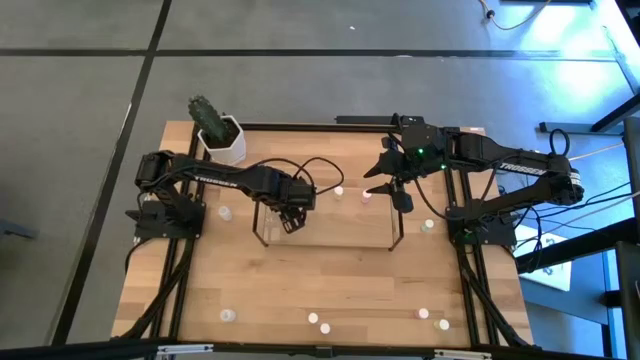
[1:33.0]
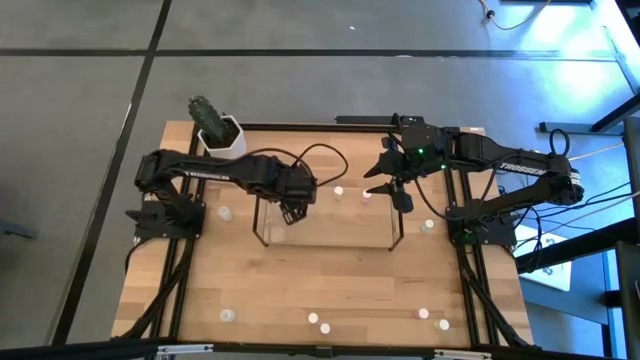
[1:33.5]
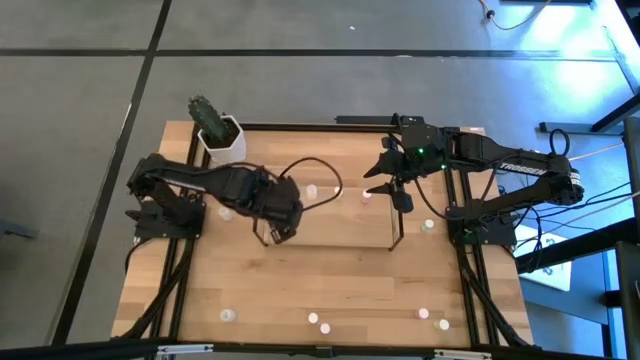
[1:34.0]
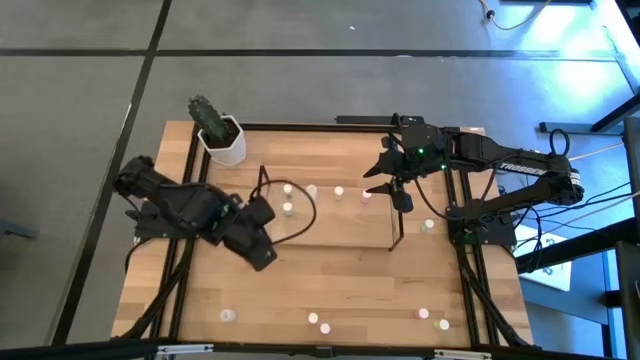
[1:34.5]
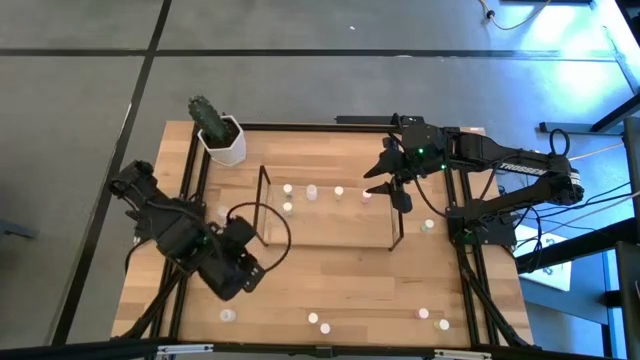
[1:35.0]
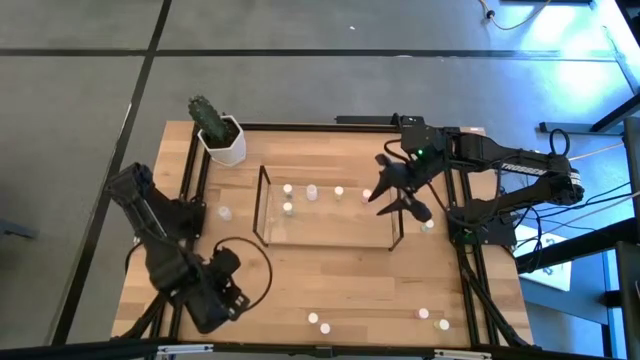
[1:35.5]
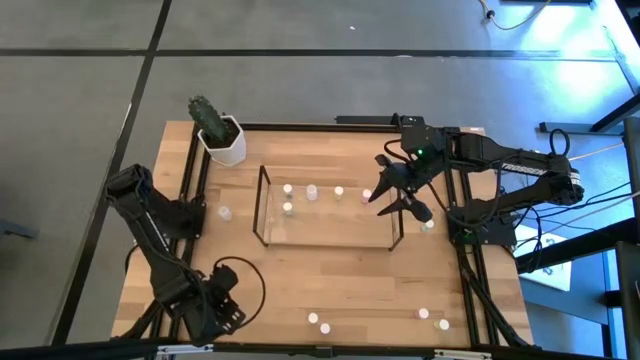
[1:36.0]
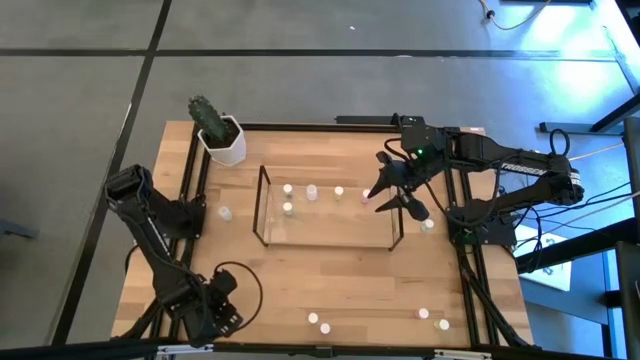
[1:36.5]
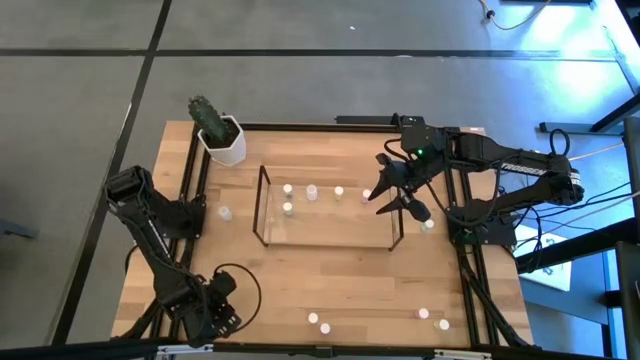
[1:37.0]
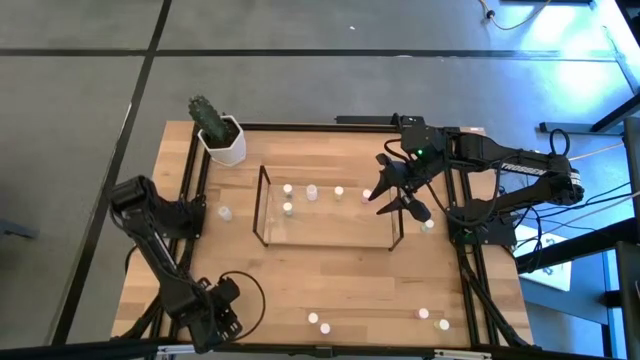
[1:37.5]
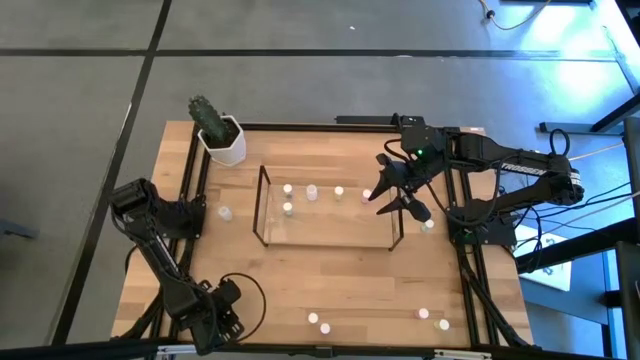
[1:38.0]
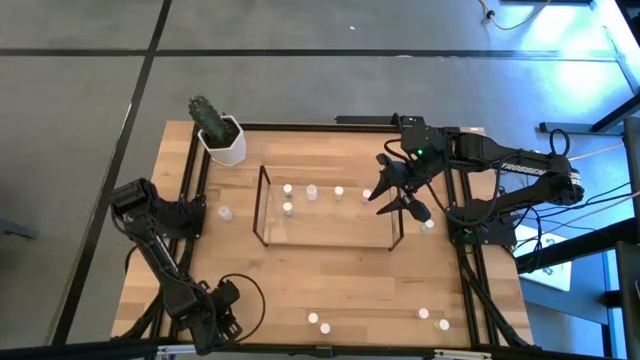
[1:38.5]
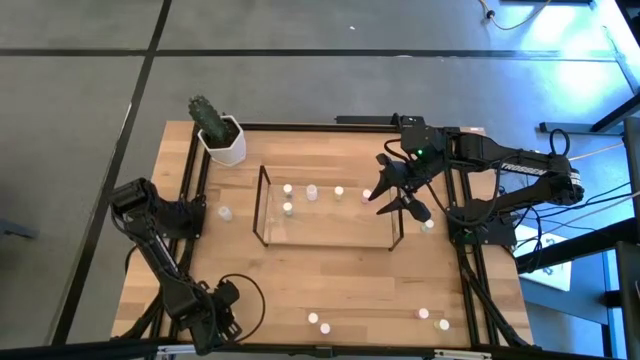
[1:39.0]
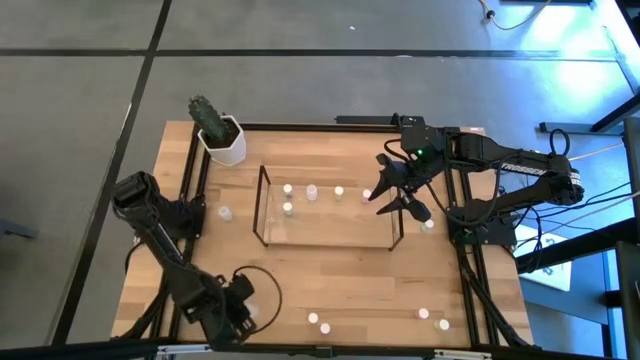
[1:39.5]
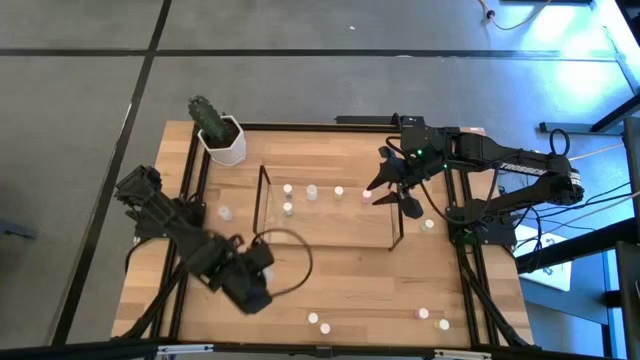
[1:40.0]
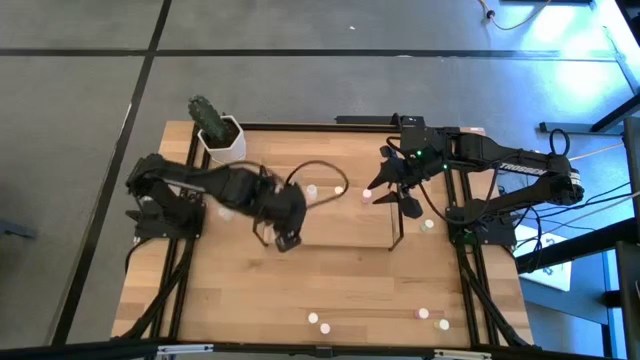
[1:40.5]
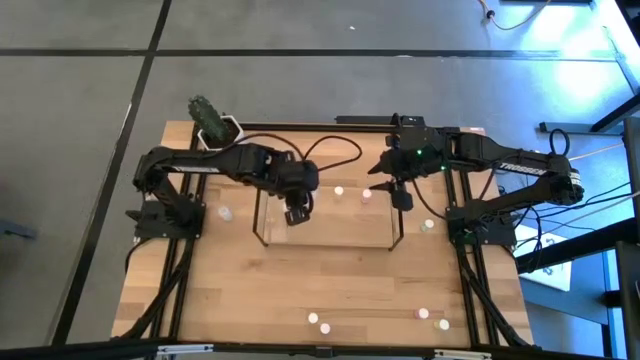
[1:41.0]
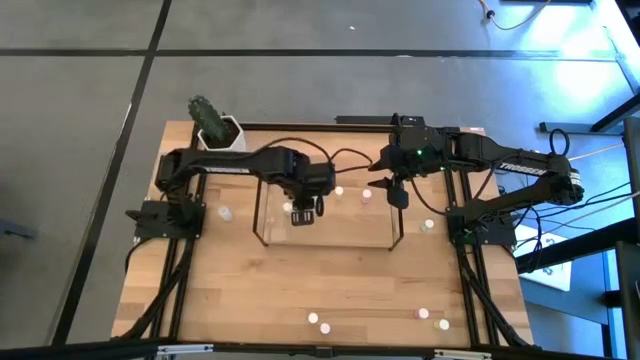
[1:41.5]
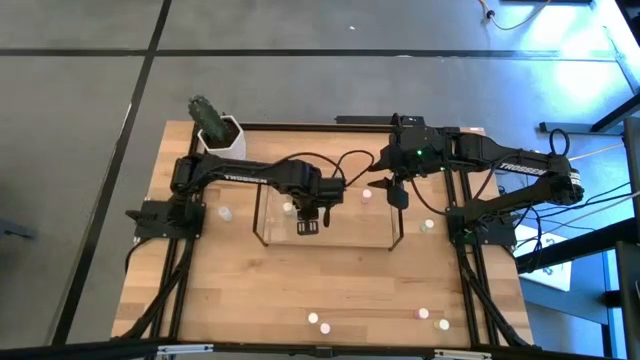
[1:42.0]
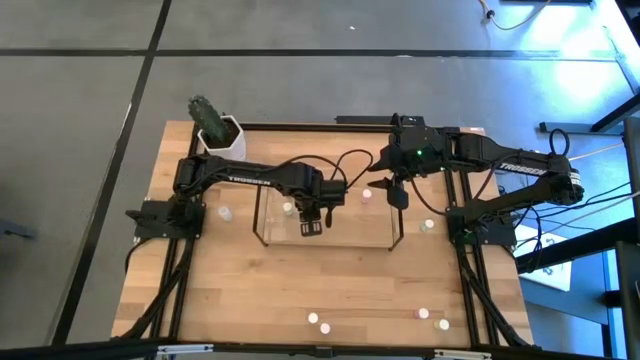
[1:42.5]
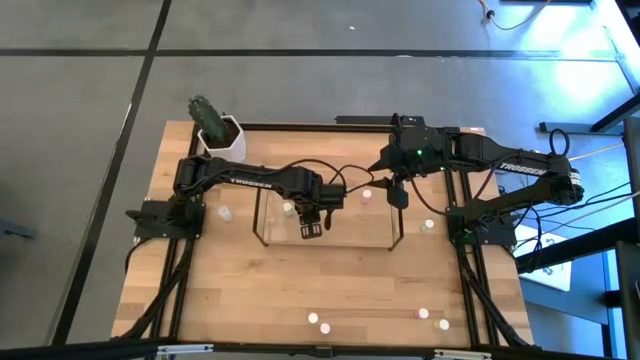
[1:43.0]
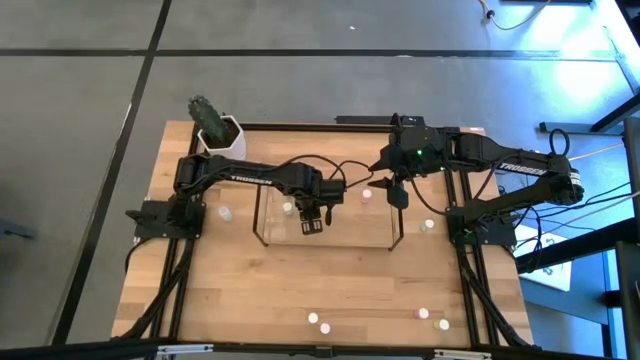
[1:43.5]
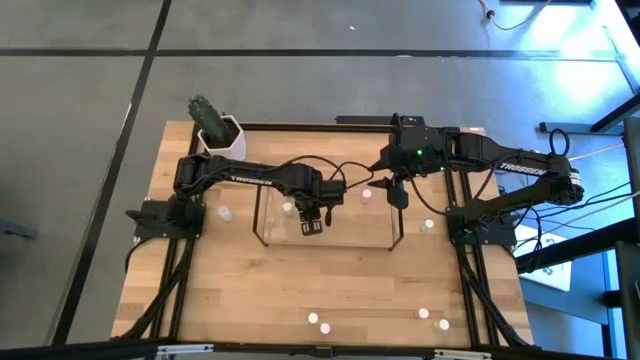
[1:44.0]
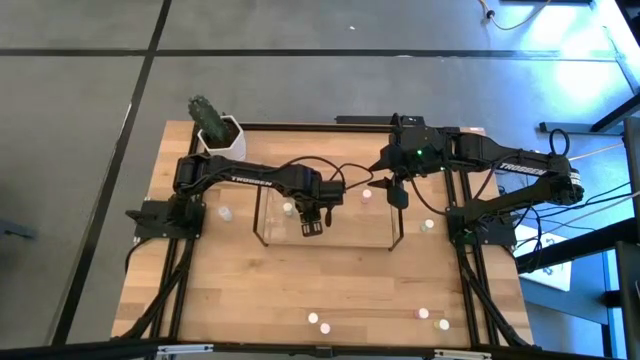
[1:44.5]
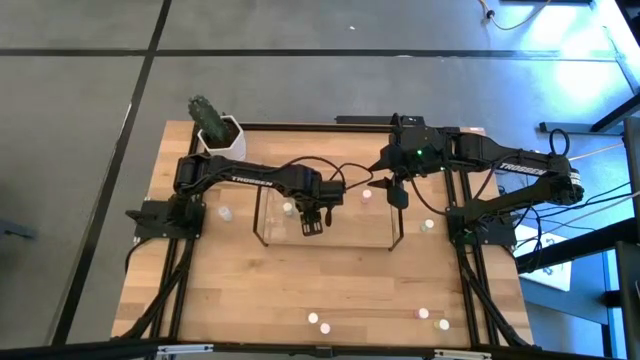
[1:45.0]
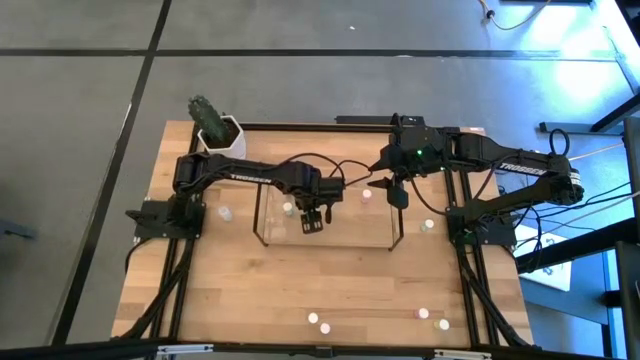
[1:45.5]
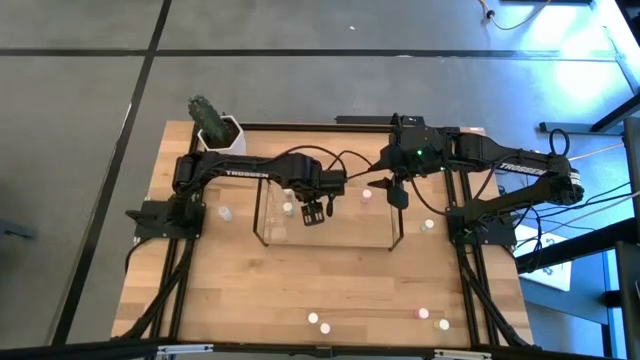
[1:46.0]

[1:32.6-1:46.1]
Task: Pick and place medicine bottles onto shelf by color
Put the bottom white pill bottle aligned with the other white pill bottle on the shelf

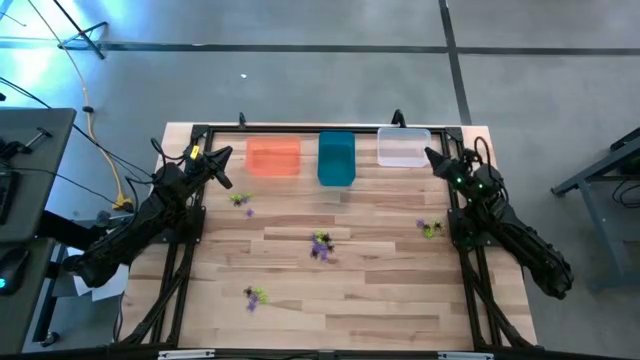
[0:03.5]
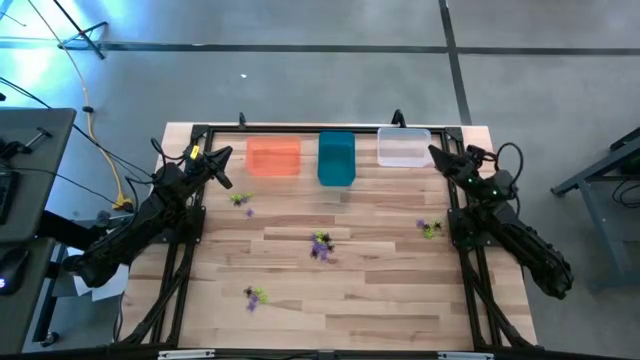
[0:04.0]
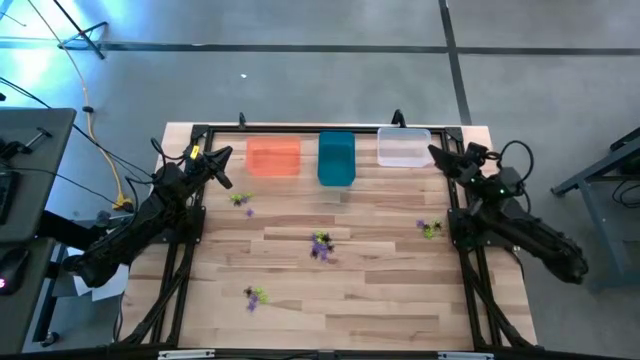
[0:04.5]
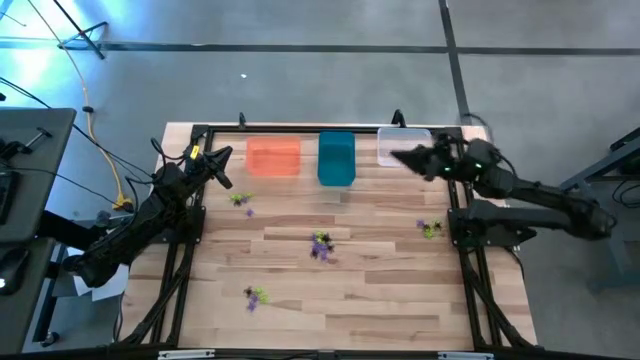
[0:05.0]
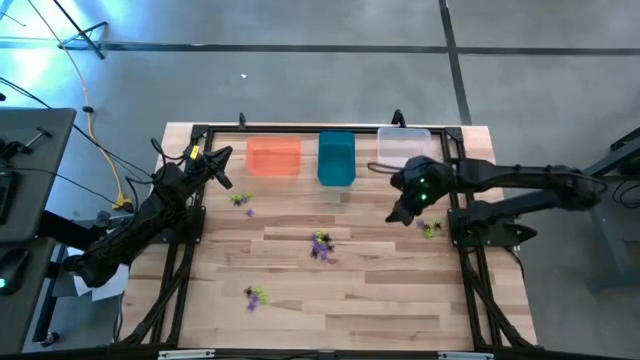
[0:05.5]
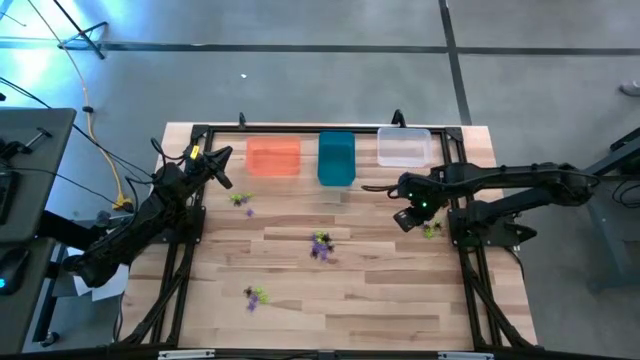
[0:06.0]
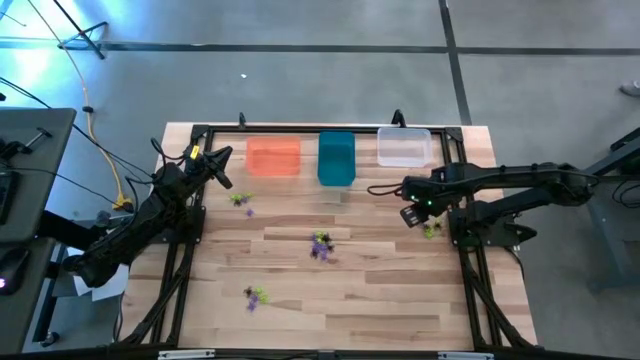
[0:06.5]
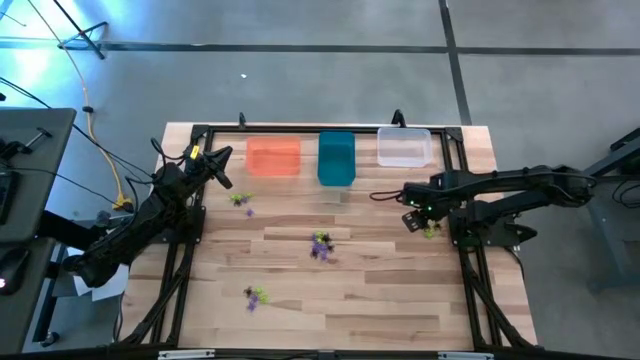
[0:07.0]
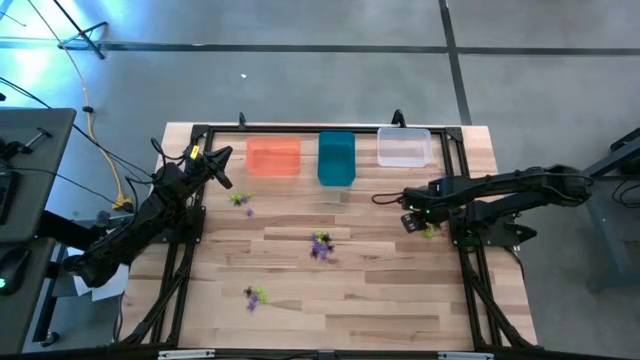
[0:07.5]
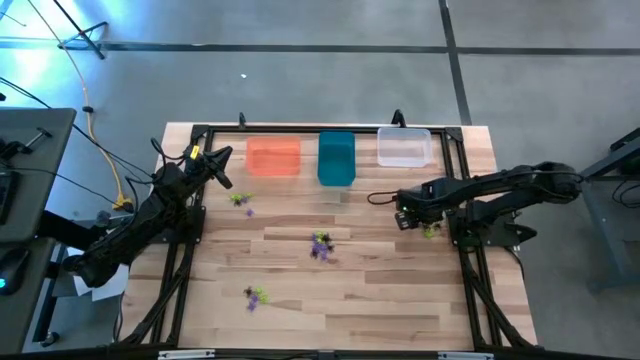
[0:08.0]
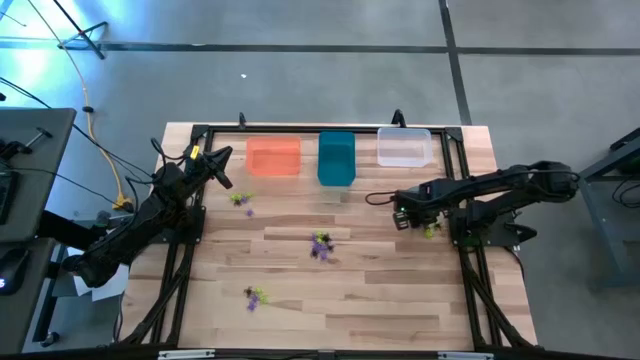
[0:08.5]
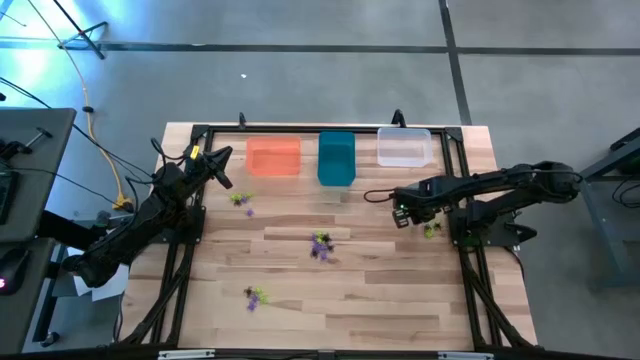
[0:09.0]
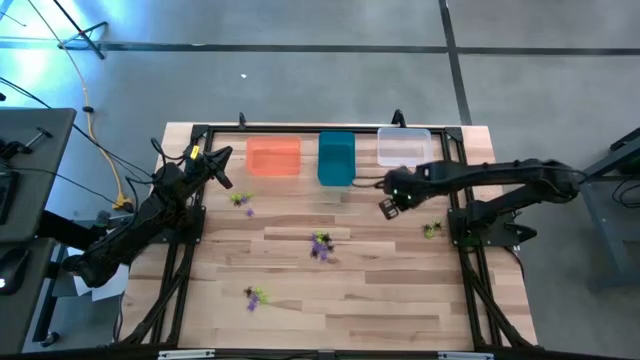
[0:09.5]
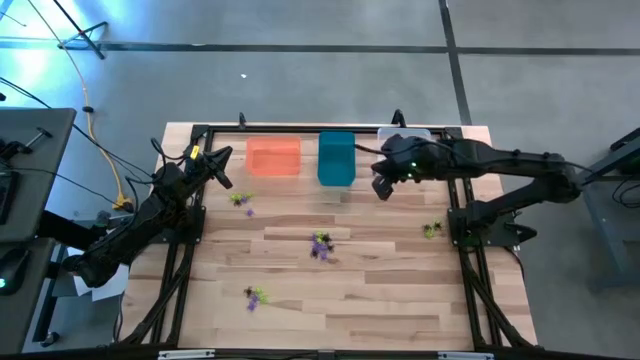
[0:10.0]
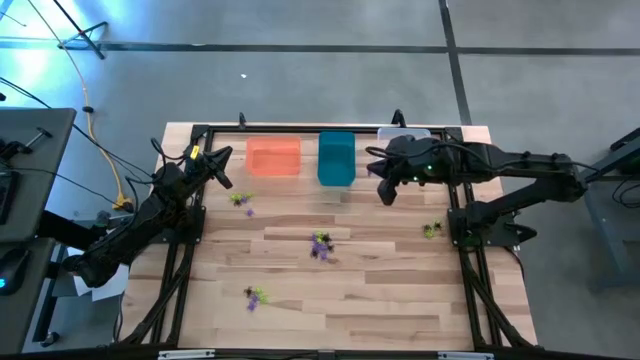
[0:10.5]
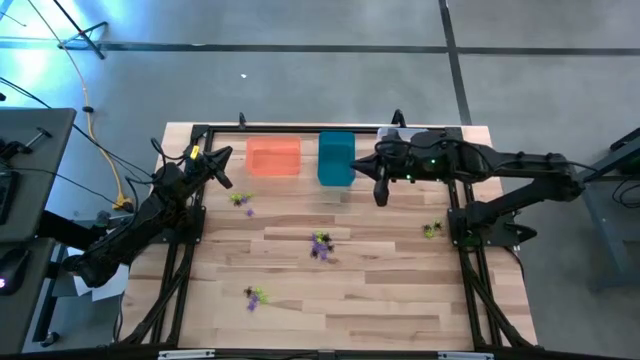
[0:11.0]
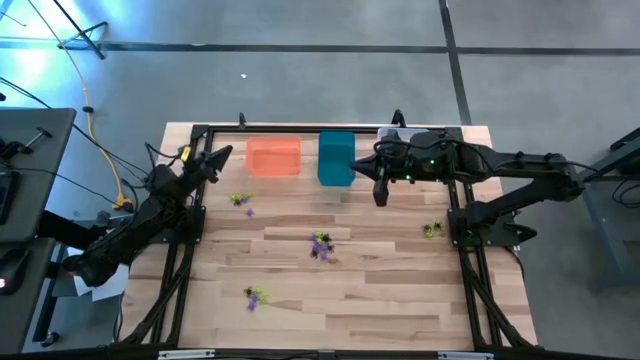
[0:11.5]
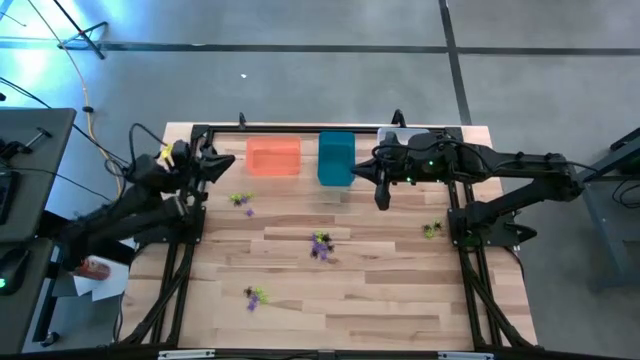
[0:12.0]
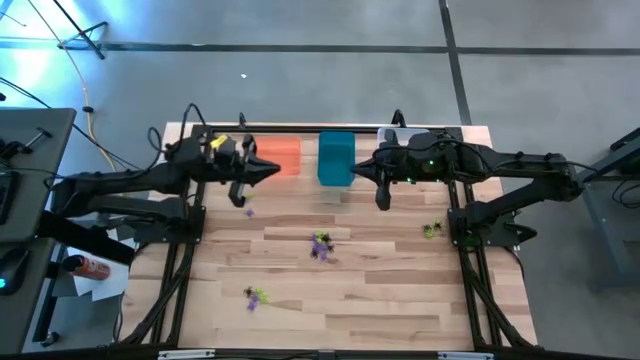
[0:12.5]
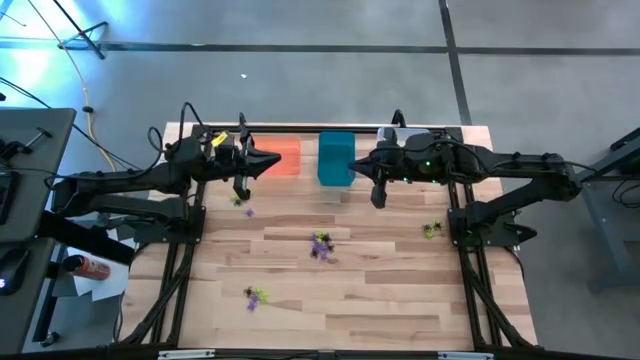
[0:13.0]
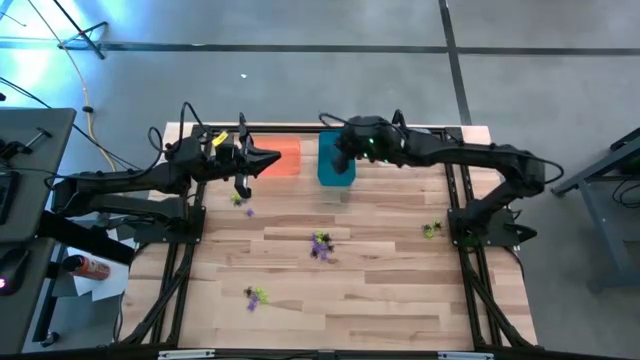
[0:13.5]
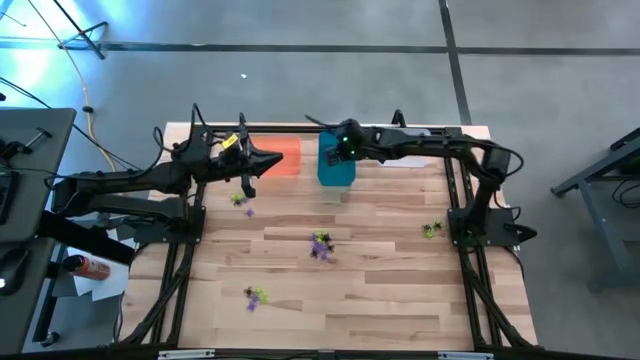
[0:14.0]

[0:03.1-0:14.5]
Task: Sort Halloween decoration
Put the purple spider toy into the blue bin
